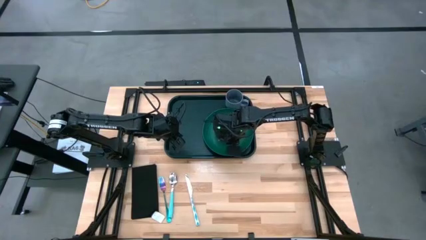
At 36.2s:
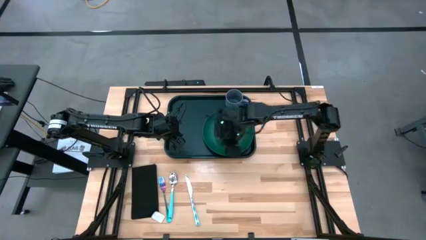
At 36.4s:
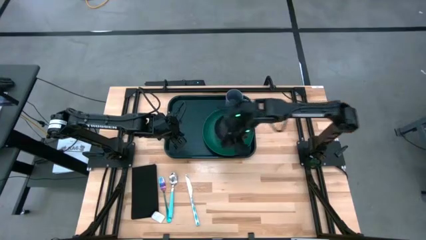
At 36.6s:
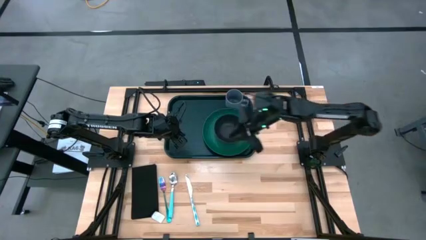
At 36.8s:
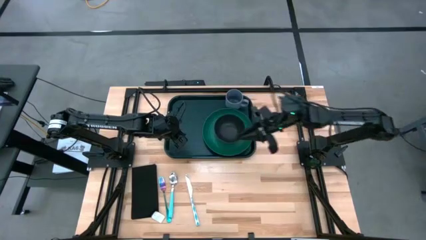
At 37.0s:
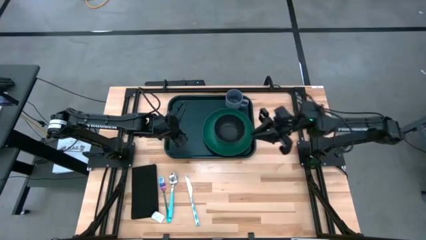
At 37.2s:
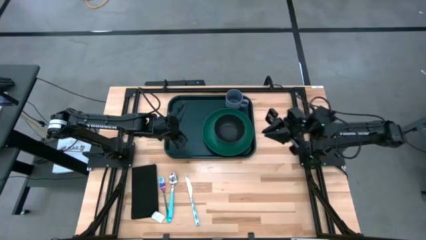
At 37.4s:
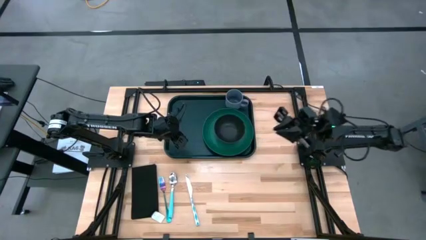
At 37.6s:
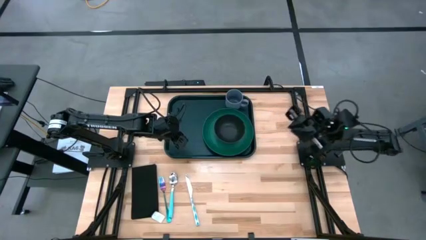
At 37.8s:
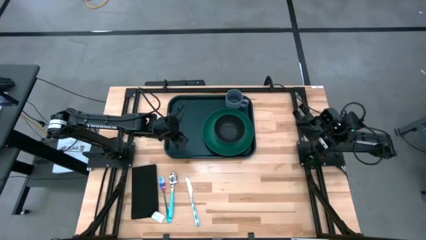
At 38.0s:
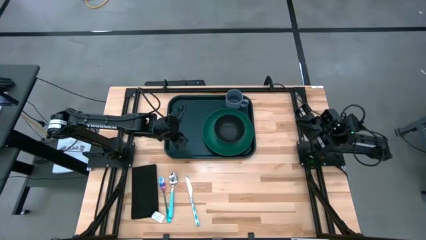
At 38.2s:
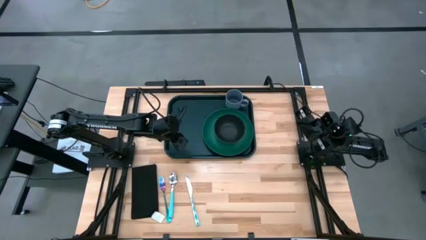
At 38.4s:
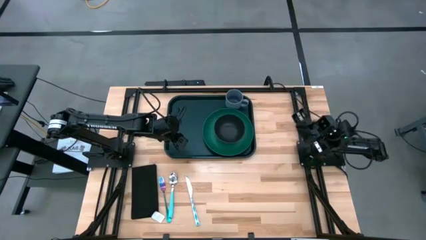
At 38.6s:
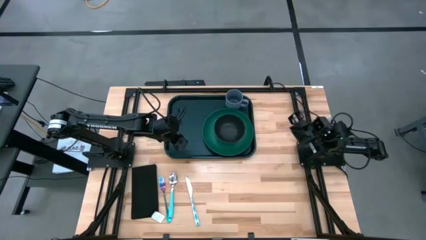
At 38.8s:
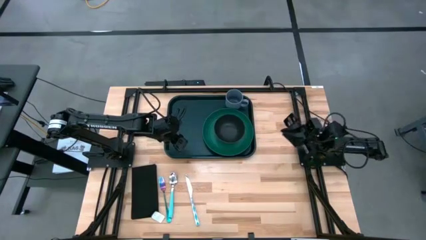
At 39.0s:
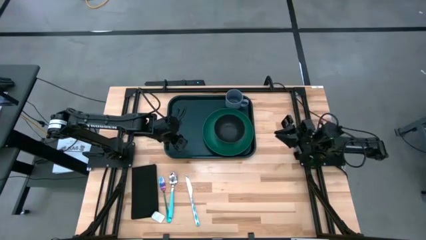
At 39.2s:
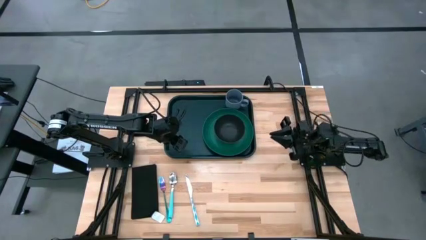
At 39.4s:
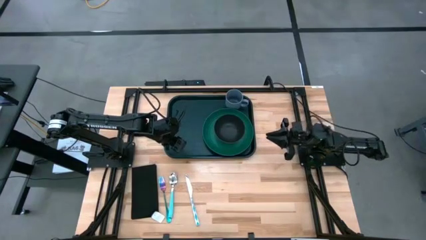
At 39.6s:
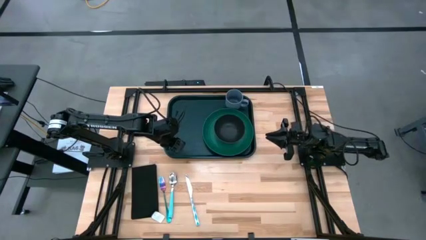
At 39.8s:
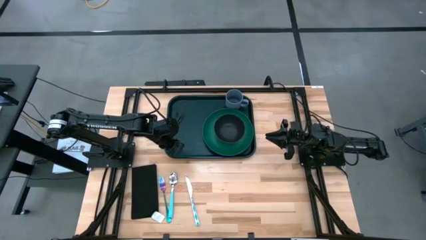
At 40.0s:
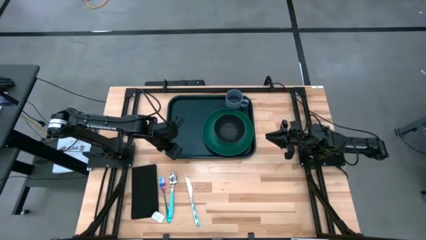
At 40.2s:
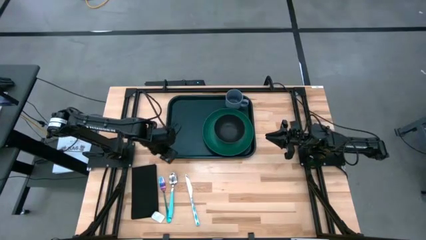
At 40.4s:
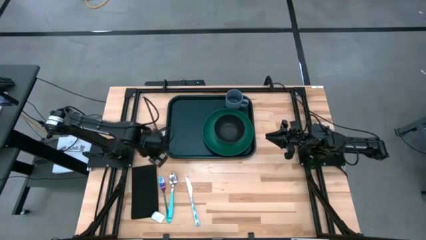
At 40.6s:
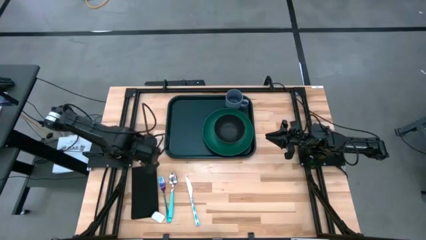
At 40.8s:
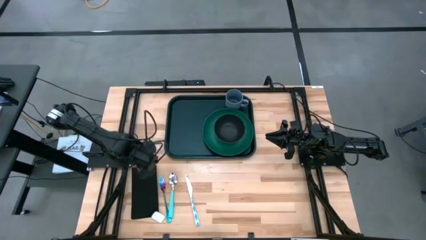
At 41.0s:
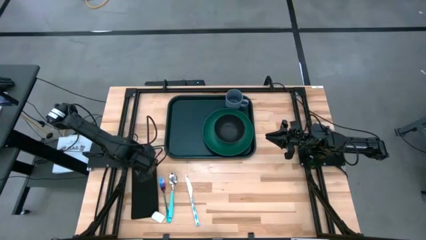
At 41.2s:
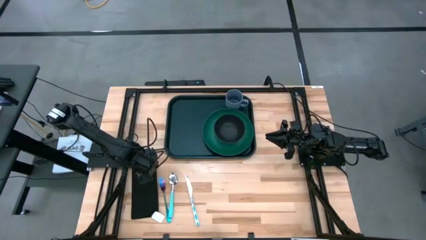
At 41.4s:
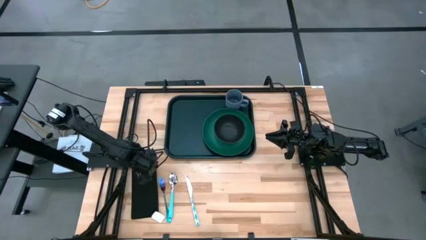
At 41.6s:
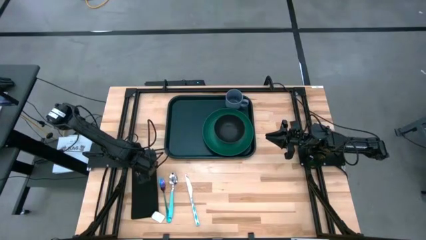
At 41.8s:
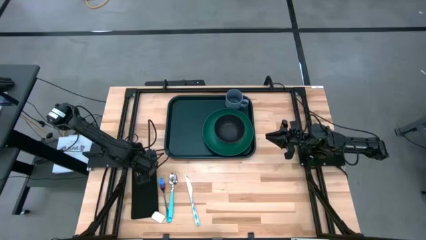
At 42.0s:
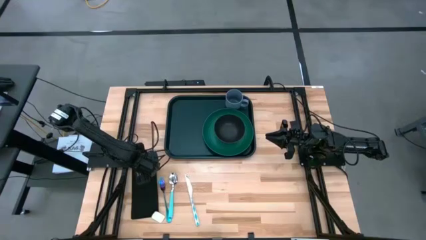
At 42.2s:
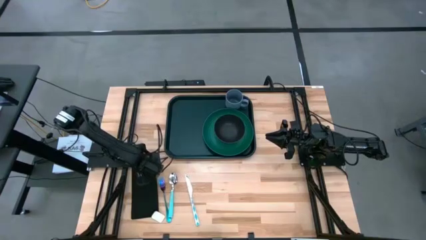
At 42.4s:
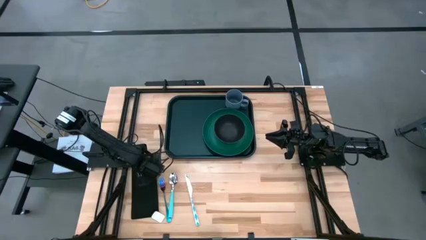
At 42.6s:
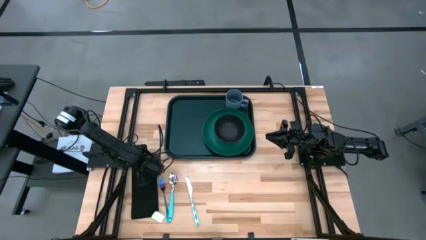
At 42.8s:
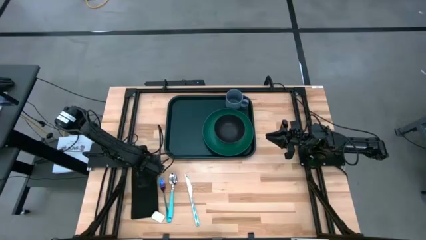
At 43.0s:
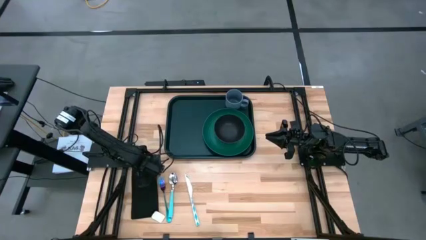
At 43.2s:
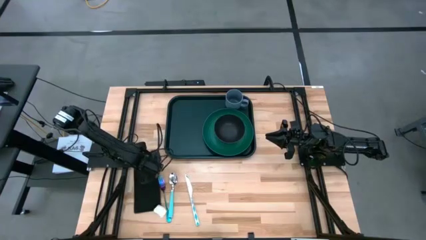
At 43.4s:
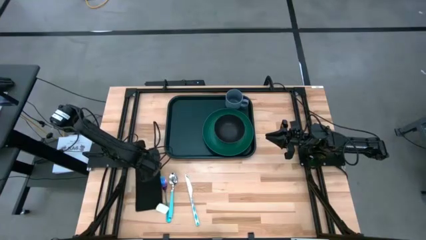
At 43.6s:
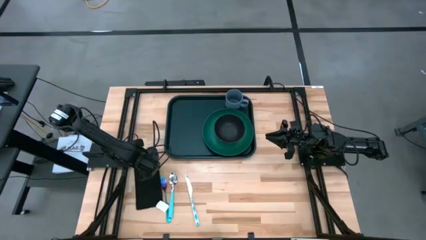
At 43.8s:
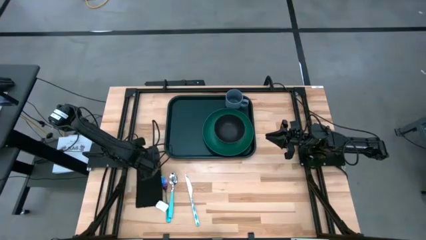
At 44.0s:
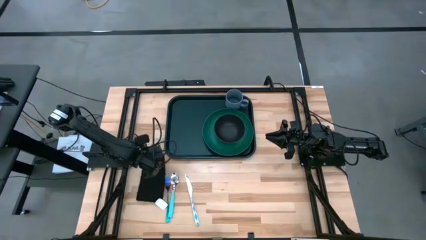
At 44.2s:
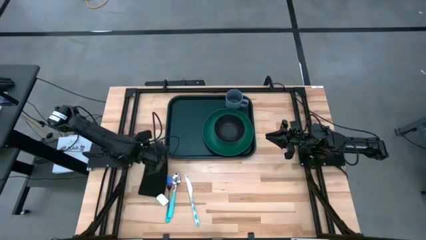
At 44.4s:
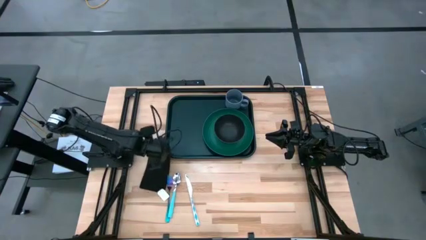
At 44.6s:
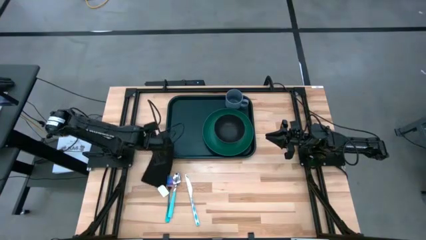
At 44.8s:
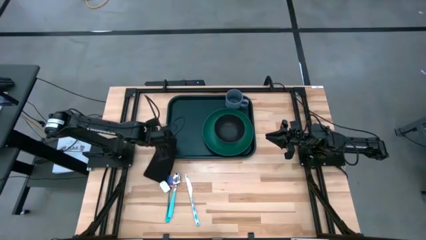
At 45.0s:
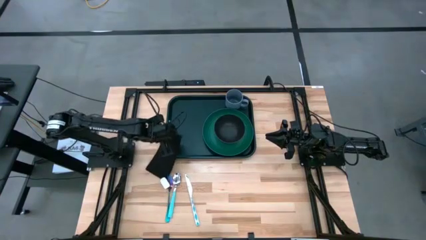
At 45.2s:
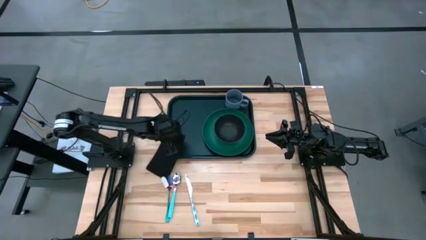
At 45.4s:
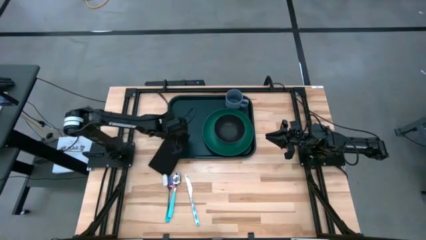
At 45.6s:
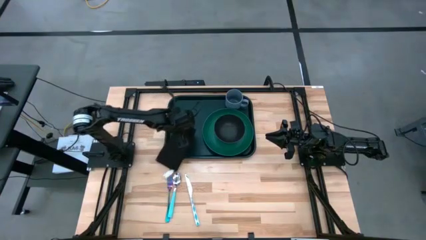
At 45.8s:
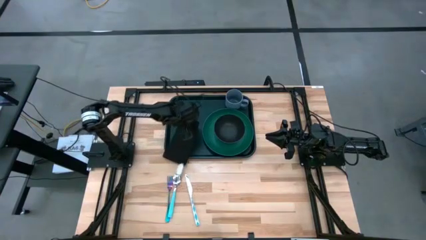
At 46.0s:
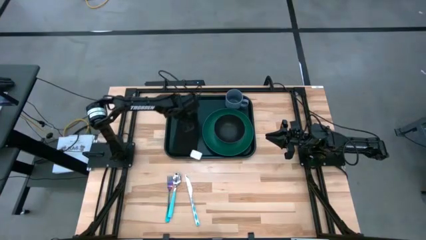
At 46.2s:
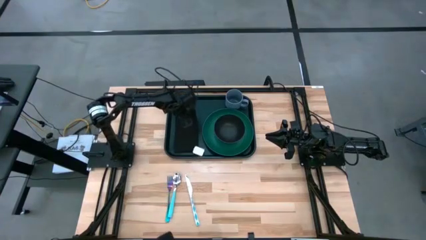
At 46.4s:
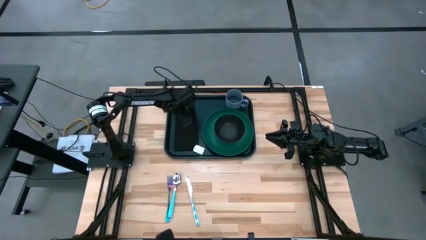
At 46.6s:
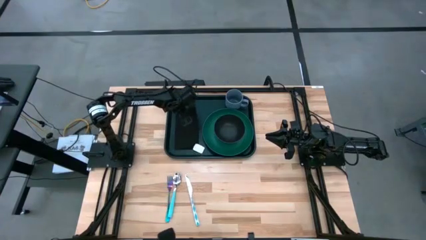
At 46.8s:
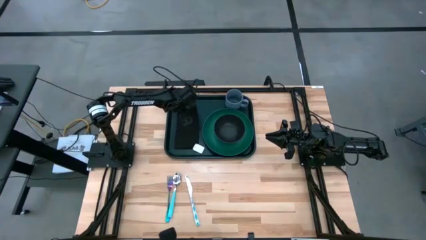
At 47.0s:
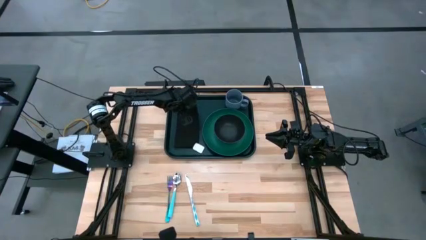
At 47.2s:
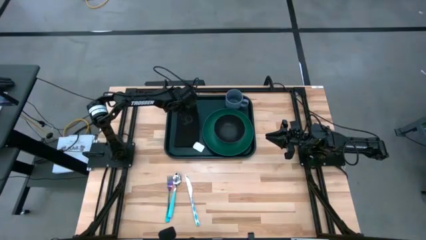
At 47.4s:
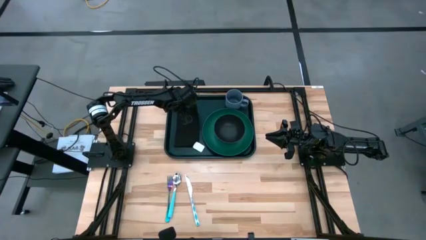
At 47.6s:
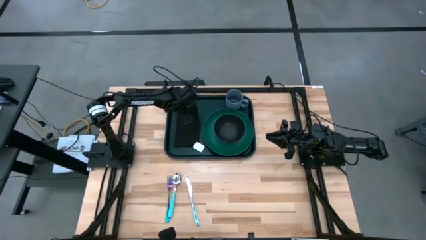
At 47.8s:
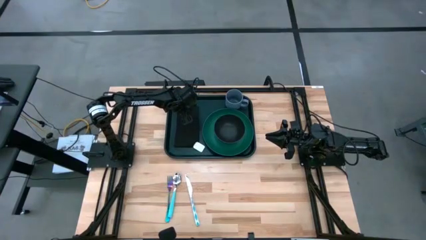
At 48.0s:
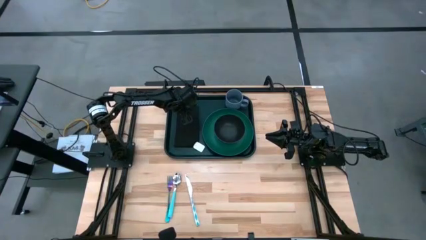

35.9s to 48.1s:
Task: Set up tray
Put the black towel beside the dark green plate on the black serving tray

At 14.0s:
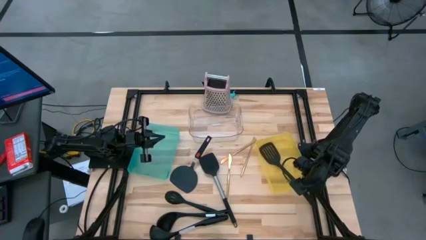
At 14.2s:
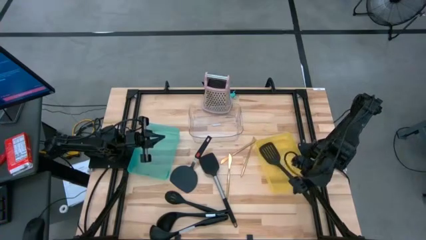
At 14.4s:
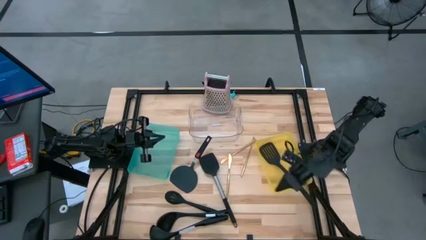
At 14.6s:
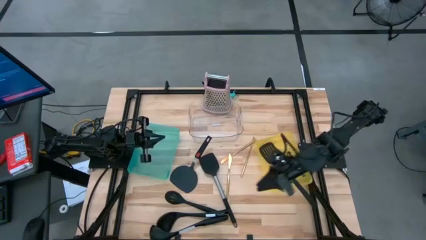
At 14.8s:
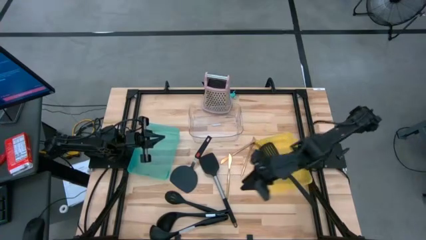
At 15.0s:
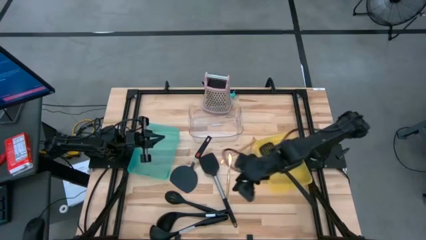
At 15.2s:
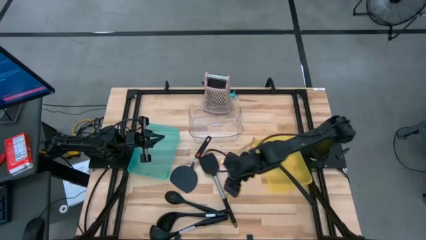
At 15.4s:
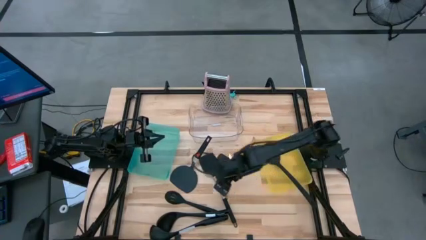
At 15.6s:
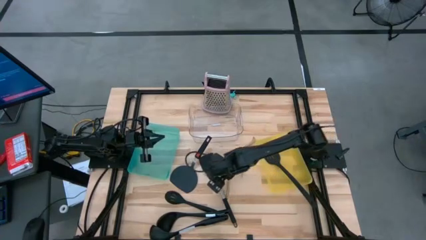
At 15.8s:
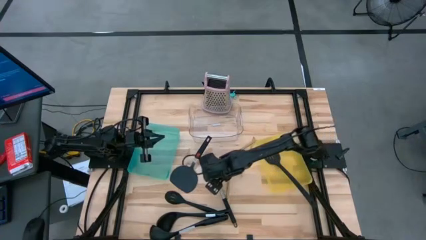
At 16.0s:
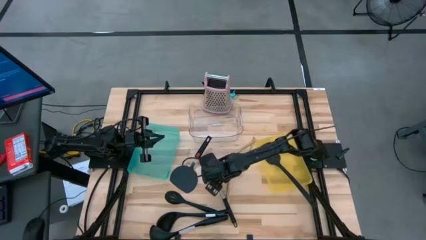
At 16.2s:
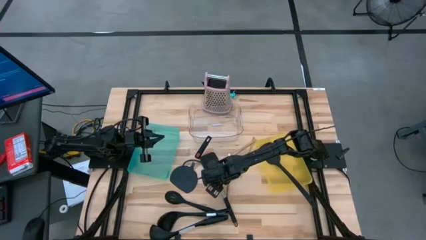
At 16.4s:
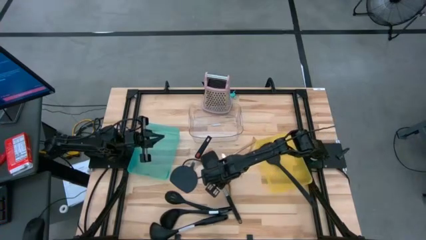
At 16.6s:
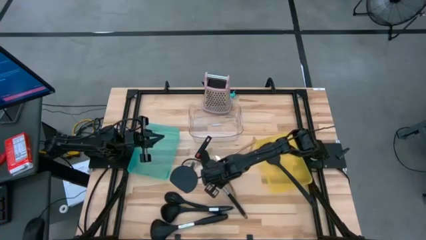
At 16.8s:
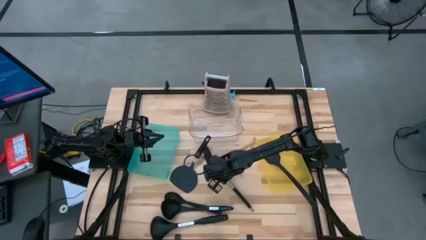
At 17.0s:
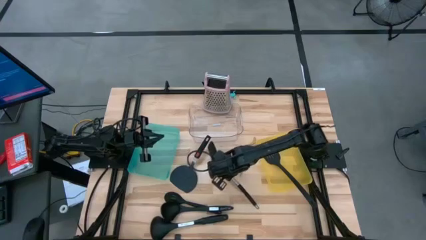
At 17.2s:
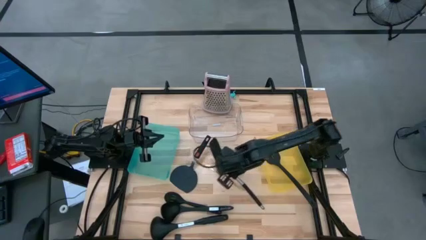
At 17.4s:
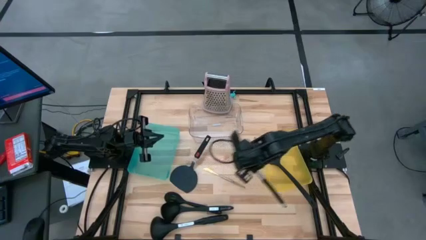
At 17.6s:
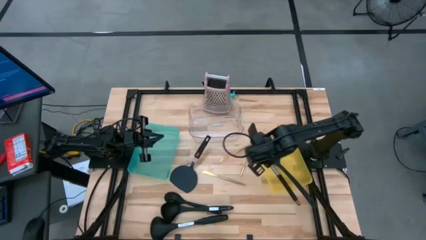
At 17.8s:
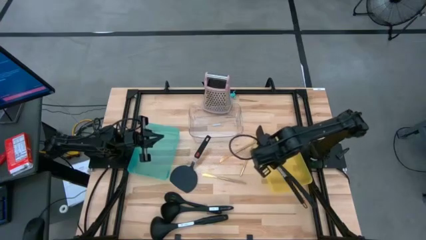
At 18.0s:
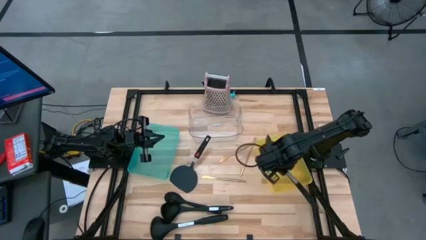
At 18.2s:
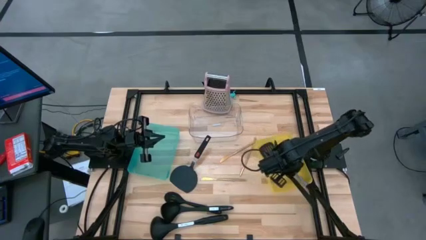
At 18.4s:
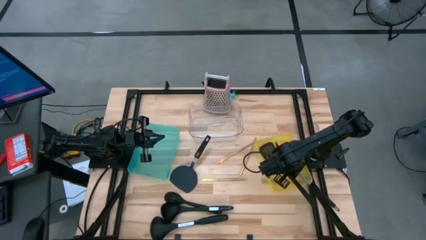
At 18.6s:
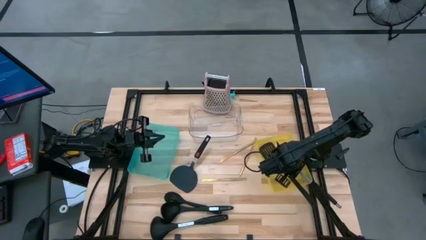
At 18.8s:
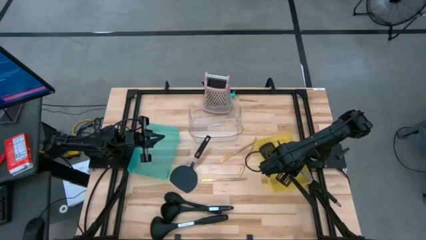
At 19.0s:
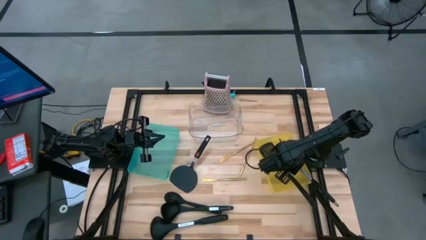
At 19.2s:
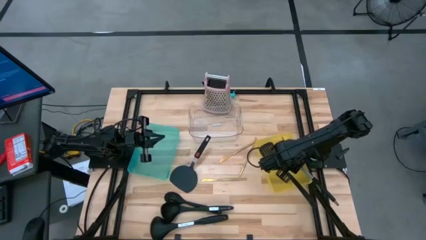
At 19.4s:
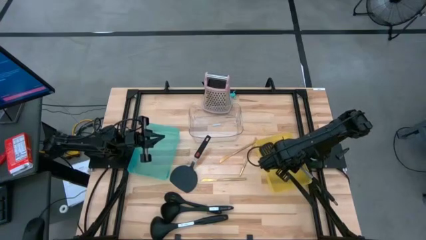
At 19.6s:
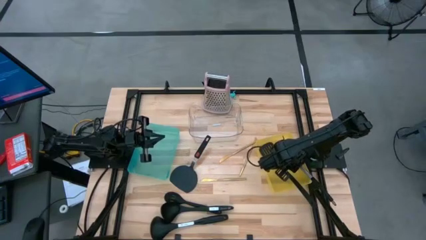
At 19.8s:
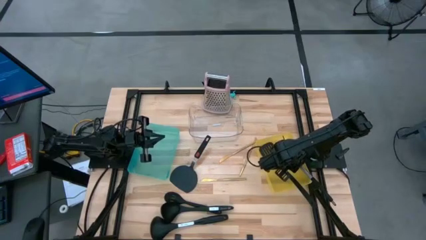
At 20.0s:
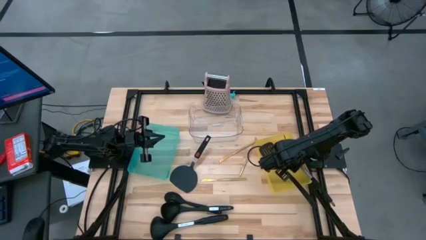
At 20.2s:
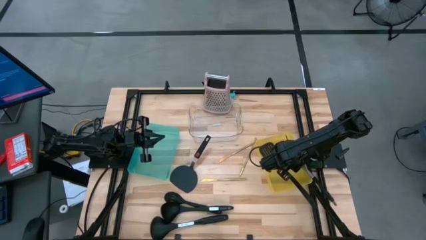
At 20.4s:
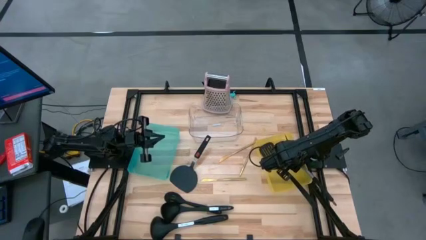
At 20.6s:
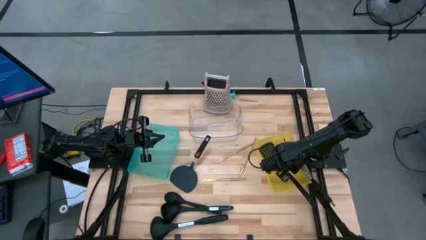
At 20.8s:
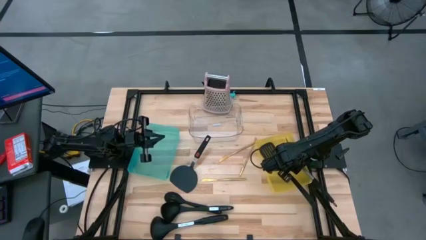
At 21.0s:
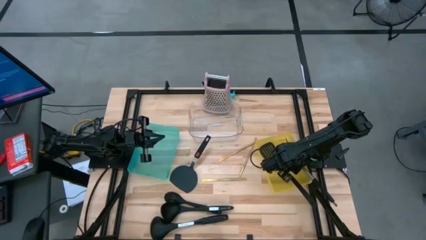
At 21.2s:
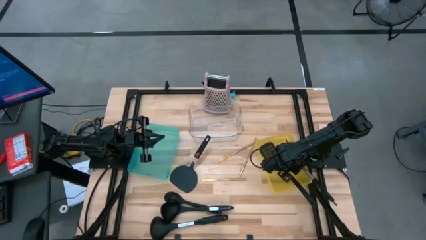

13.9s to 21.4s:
Task: Pick & Place Kitchen Items
Put the black spatula into the yellow bin
